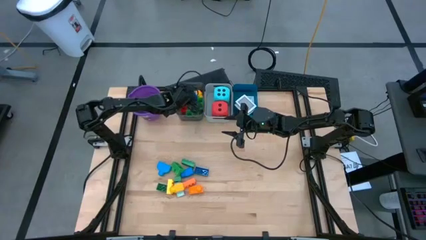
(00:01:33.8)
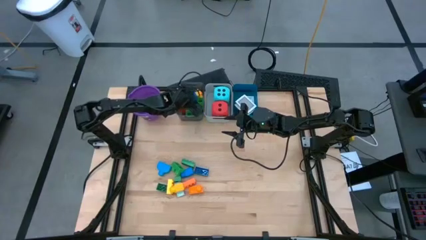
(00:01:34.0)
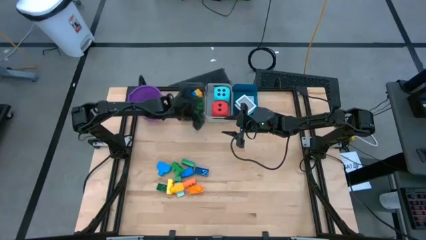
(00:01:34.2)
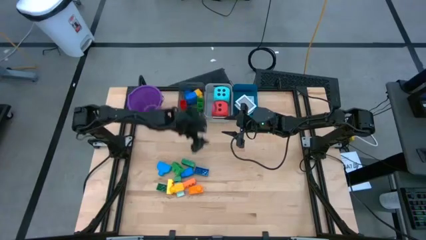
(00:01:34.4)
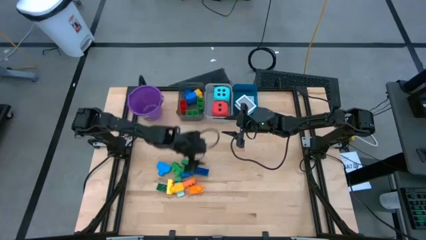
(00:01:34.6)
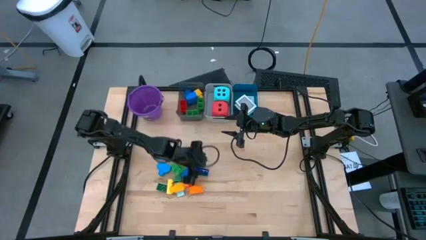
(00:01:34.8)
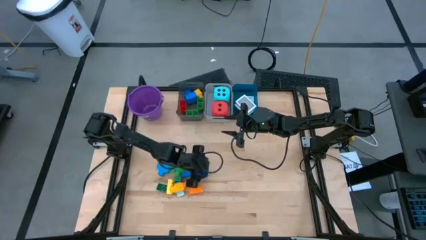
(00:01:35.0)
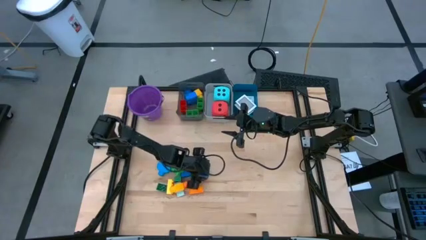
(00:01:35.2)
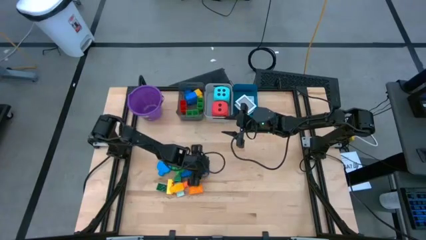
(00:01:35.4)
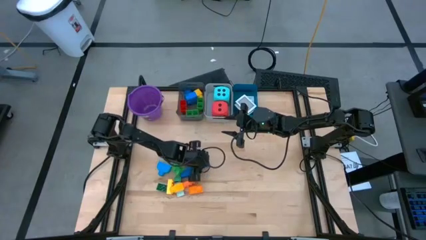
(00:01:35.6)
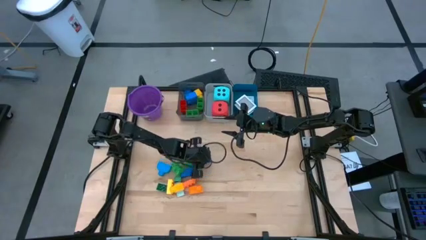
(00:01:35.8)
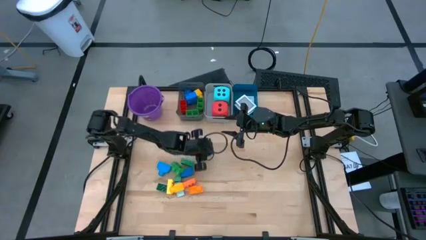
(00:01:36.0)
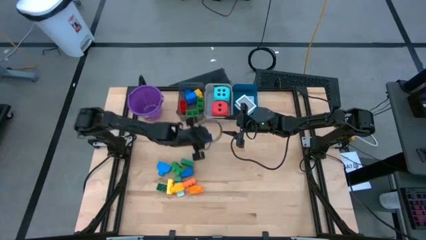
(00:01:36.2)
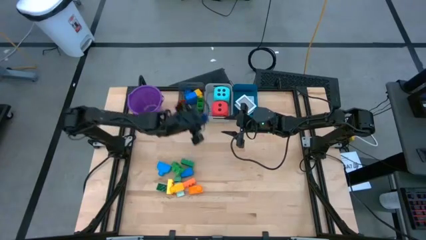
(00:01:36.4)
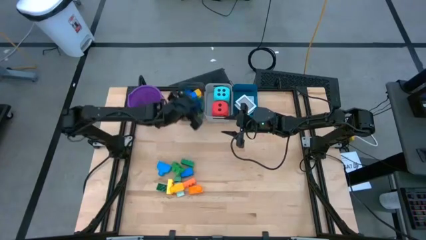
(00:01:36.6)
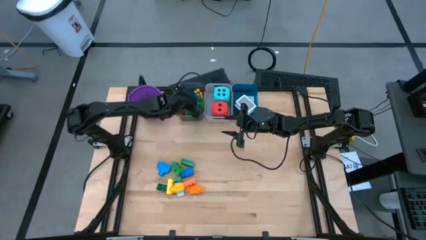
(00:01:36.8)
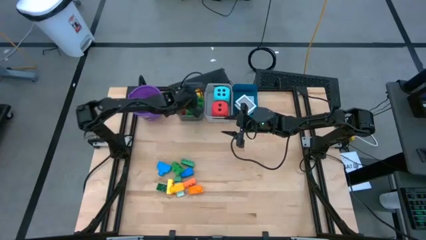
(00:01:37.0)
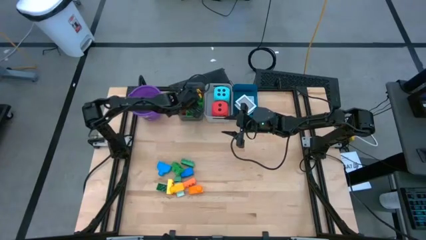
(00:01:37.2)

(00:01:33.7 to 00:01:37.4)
Task: Pick & Place Toys
Put the blue game piece into the black bin

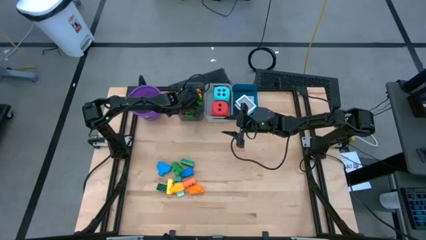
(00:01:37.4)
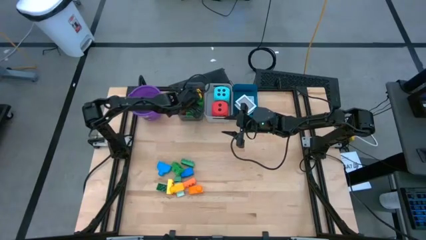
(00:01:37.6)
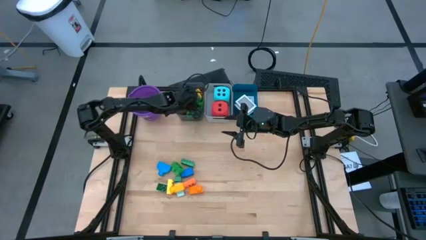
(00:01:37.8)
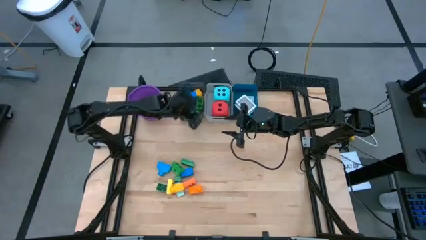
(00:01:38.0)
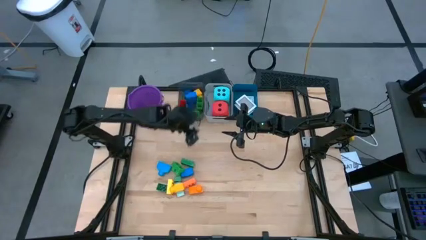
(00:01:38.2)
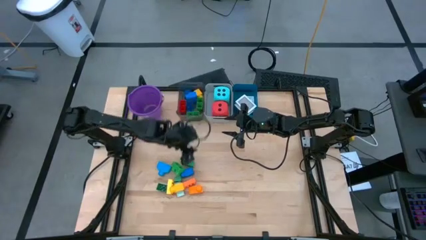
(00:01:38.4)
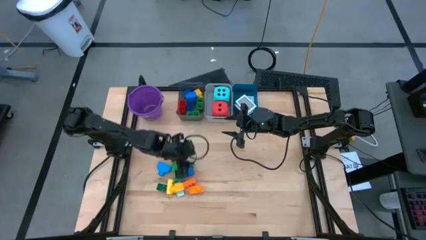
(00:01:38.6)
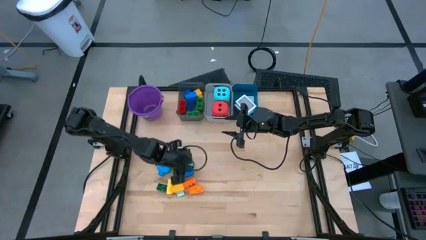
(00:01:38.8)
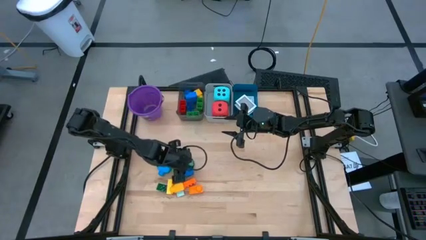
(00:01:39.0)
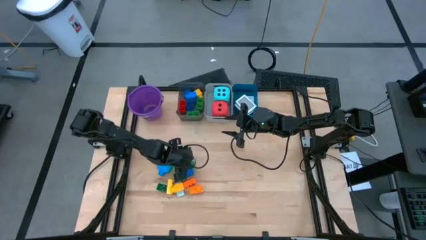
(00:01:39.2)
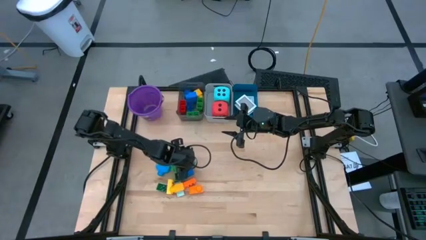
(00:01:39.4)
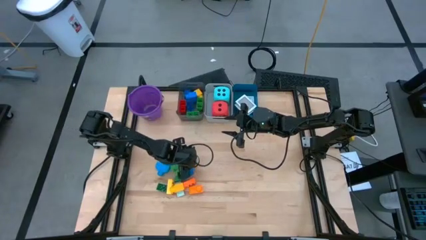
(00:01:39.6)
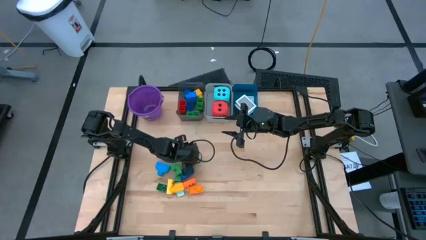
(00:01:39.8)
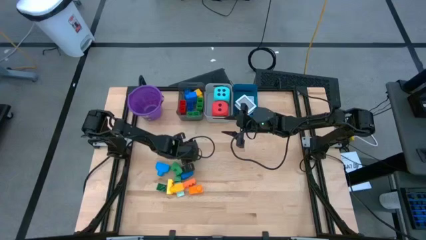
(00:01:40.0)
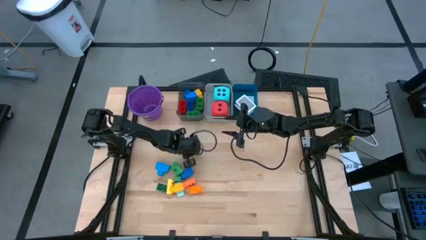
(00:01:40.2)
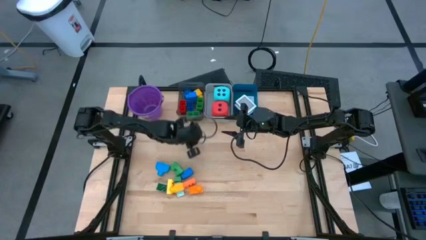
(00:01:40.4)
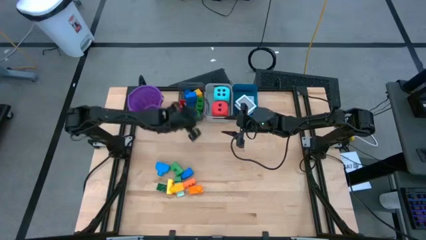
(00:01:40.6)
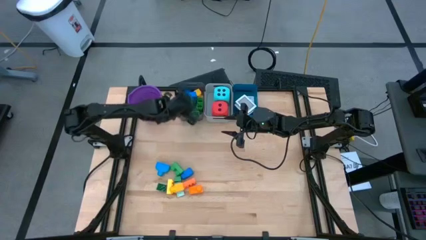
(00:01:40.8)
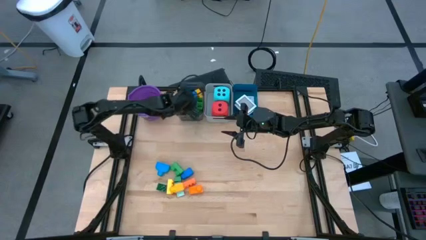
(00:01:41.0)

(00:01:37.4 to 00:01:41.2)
Put the green game piece into the black bin

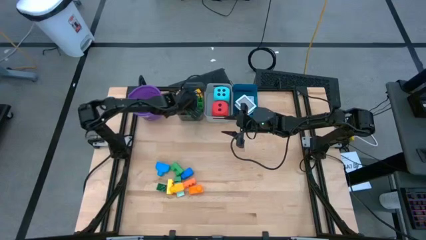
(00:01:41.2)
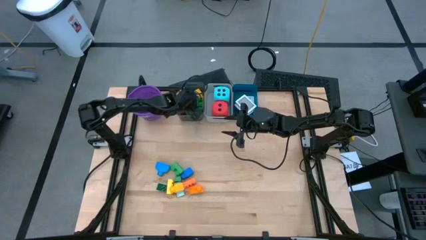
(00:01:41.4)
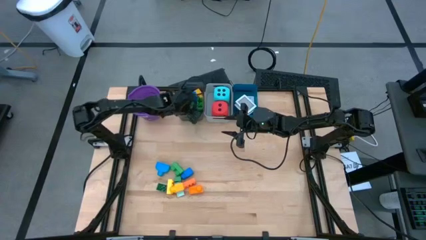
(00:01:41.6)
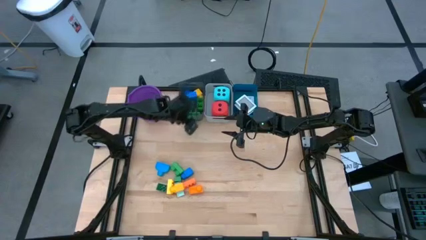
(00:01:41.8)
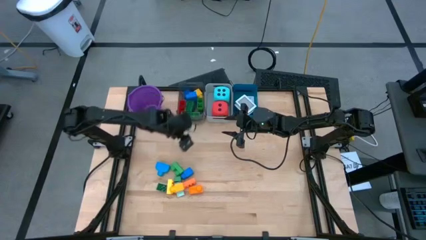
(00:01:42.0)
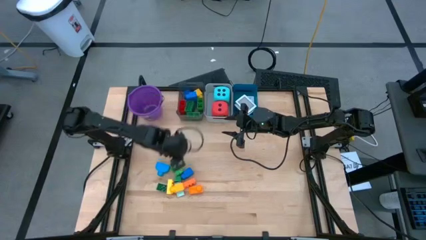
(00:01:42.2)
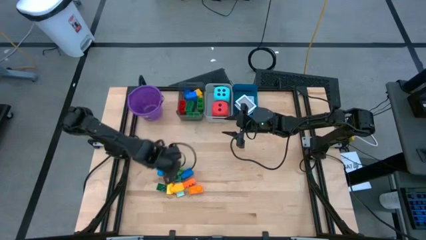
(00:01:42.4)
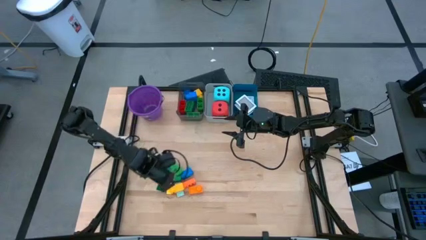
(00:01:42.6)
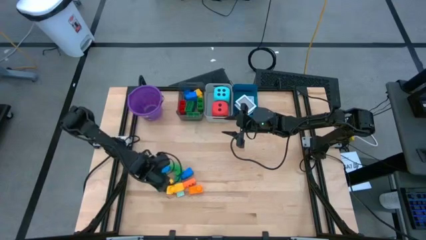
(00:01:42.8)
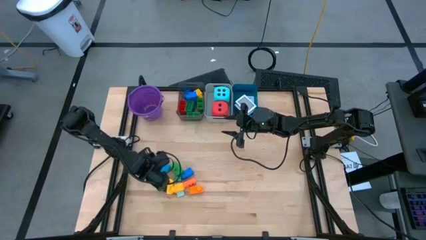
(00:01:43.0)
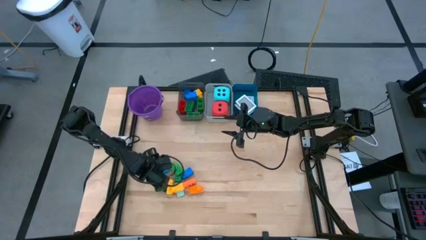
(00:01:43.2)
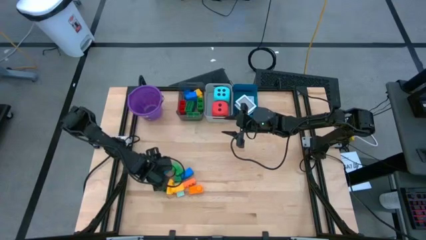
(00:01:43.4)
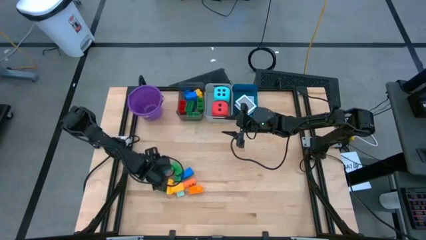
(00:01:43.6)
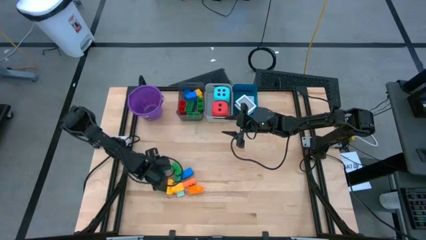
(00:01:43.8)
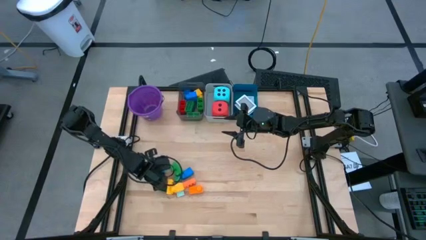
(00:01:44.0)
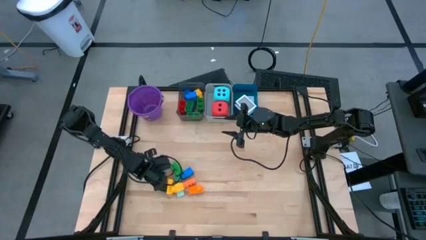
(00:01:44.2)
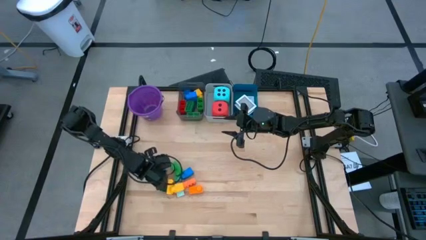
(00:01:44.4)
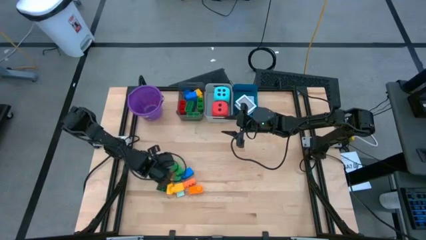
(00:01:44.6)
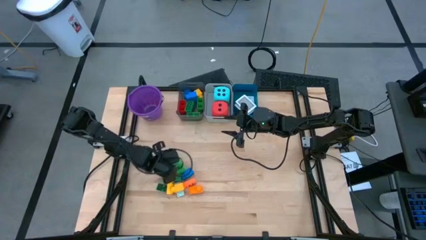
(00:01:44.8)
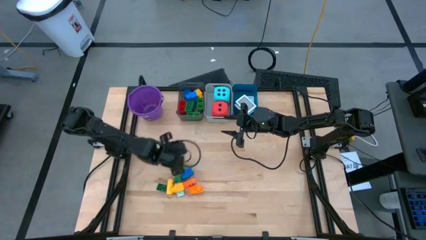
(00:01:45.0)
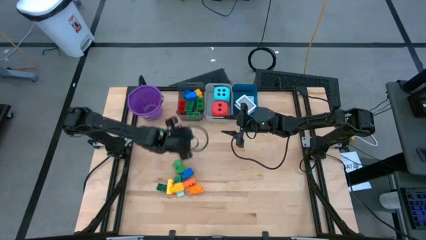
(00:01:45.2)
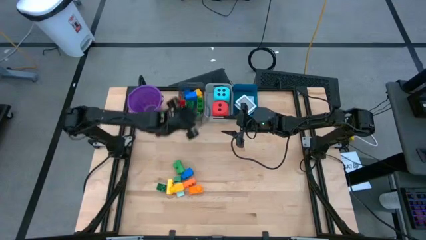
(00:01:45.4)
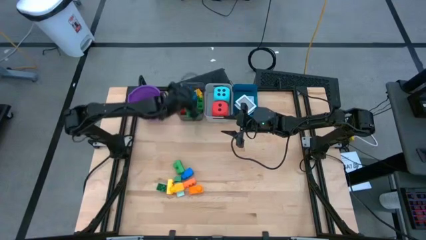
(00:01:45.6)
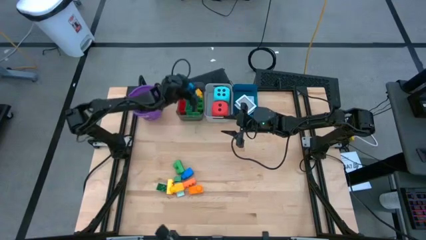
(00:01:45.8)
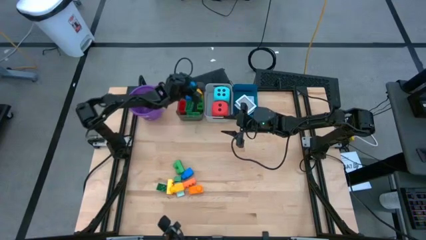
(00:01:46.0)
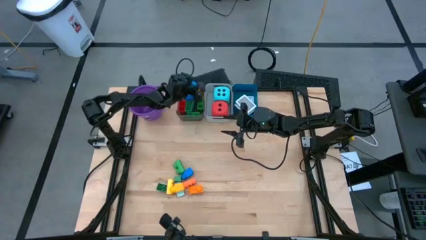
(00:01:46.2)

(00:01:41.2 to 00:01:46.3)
Put the blue game piece into the black bin

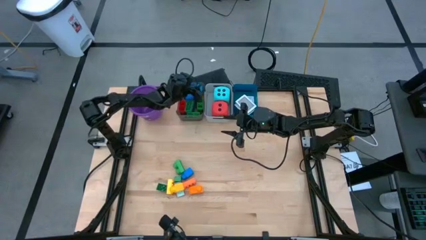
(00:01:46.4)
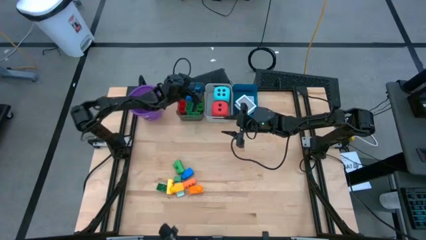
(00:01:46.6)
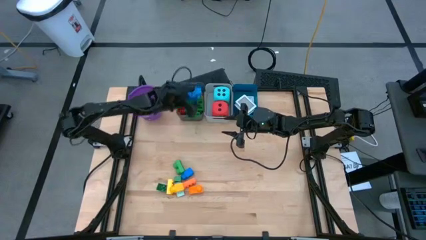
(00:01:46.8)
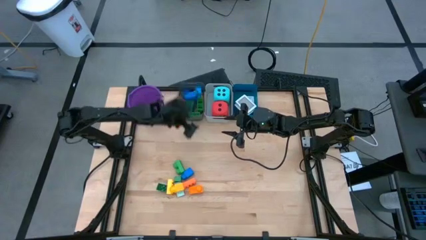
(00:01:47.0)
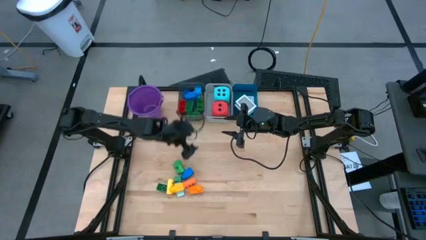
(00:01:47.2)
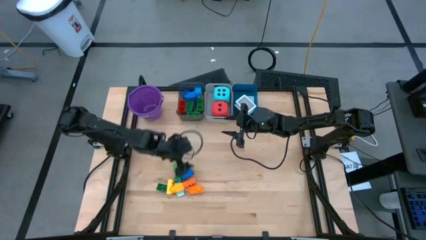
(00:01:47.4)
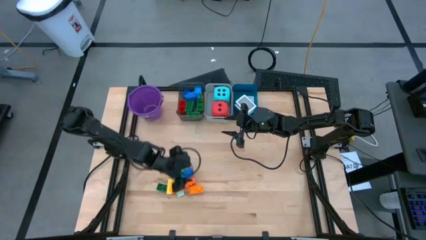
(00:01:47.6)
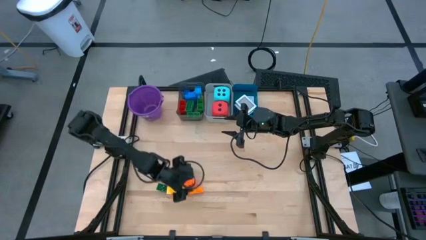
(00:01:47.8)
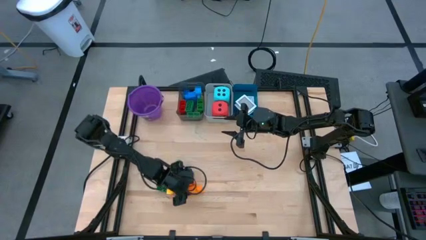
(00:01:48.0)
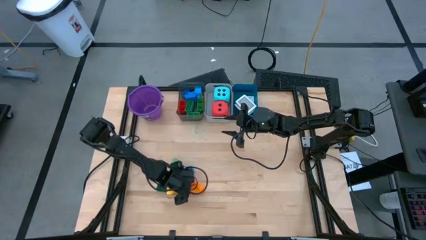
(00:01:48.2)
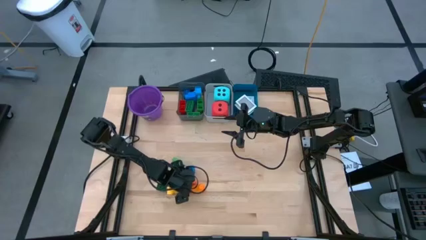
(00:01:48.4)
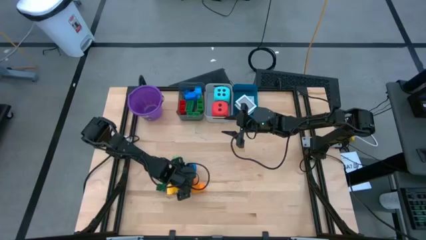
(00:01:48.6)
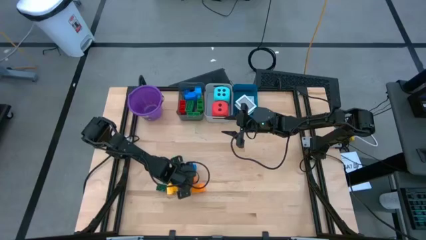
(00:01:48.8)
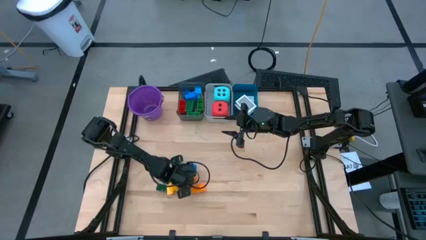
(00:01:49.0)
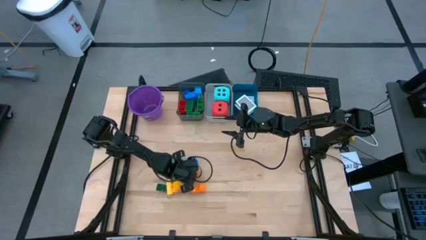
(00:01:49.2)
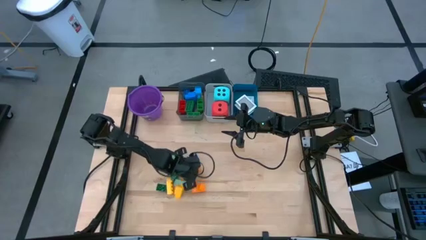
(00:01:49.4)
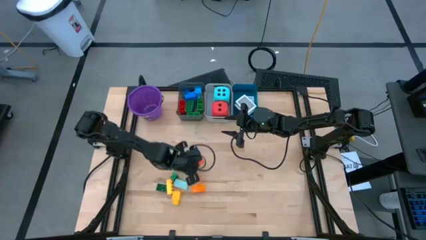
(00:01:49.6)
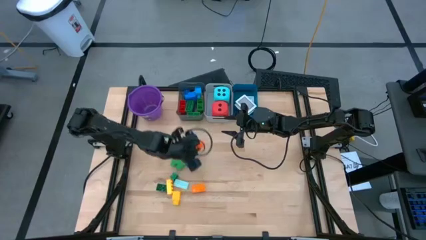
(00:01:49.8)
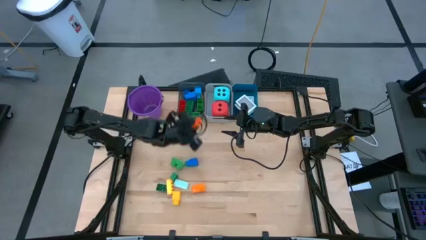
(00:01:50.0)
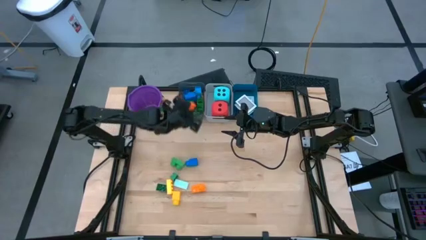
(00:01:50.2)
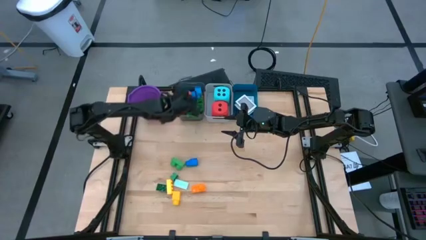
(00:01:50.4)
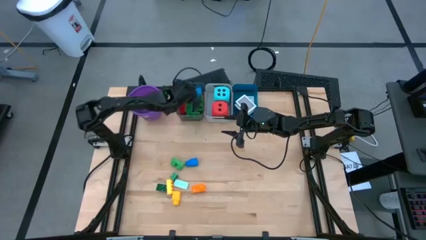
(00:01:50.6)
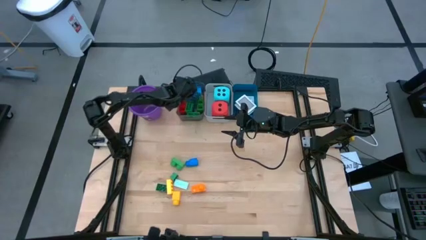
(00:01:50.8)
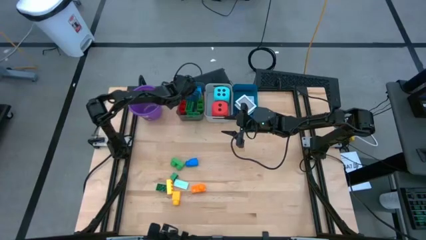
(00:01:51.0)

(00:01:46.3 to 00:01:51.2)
Put the orange game piece into the black bin
